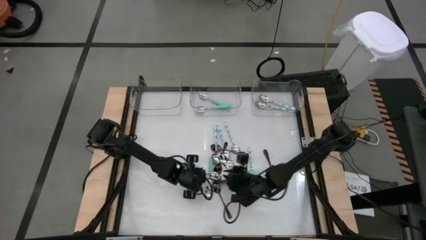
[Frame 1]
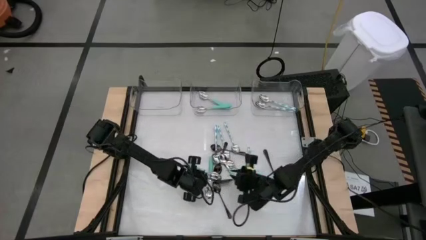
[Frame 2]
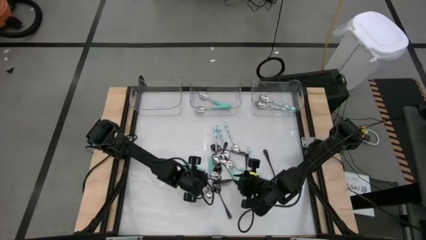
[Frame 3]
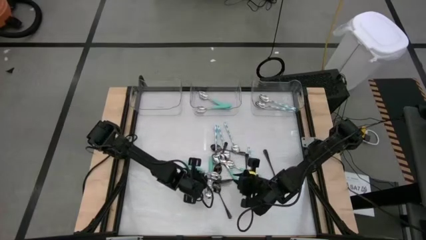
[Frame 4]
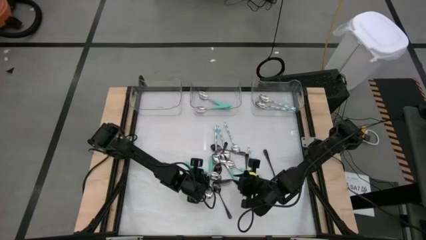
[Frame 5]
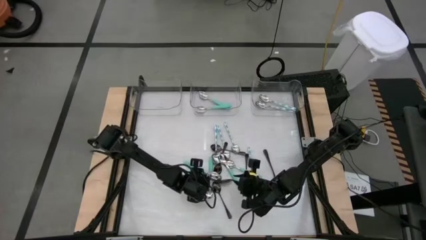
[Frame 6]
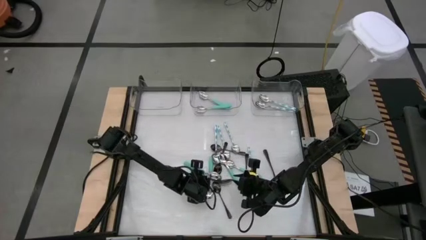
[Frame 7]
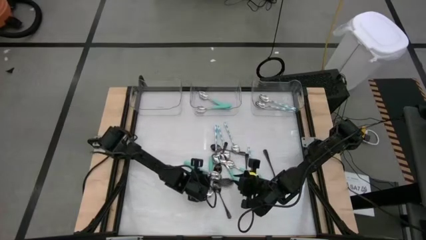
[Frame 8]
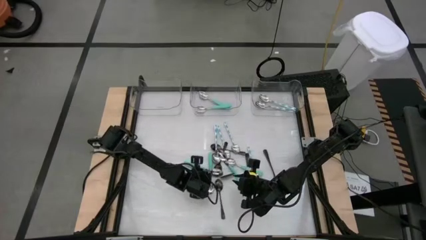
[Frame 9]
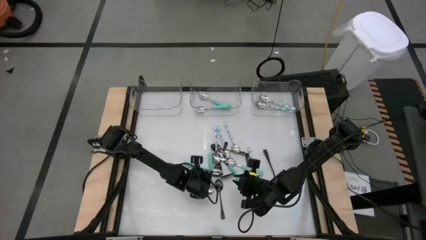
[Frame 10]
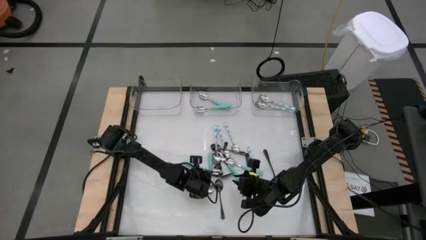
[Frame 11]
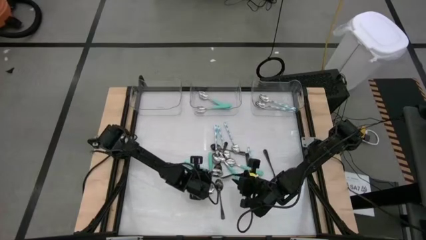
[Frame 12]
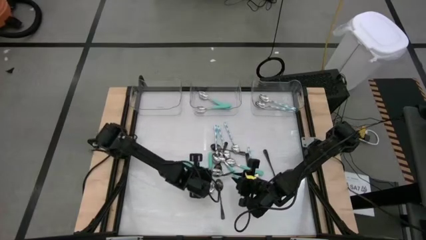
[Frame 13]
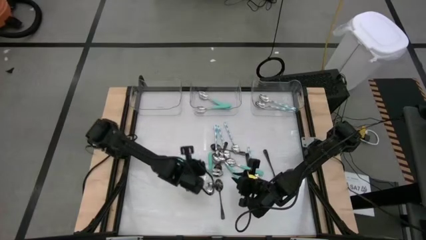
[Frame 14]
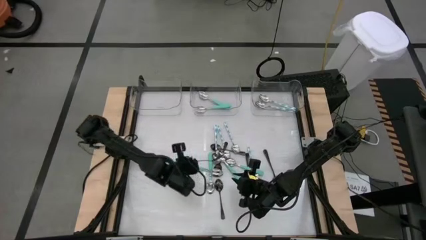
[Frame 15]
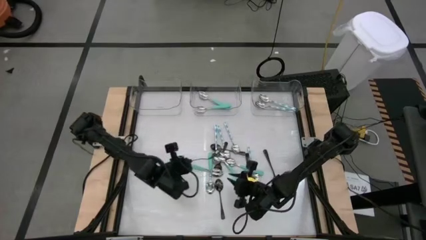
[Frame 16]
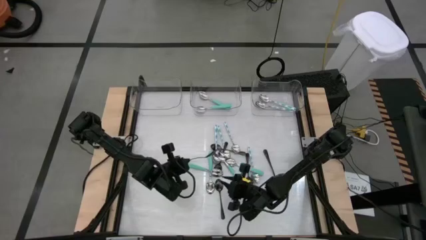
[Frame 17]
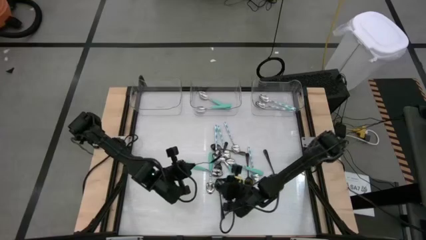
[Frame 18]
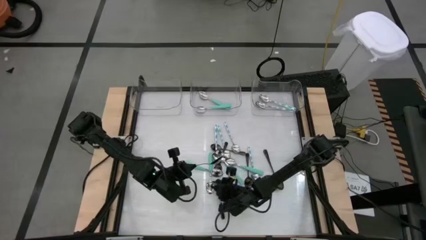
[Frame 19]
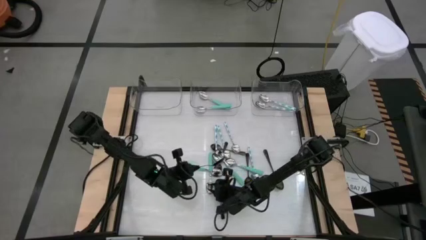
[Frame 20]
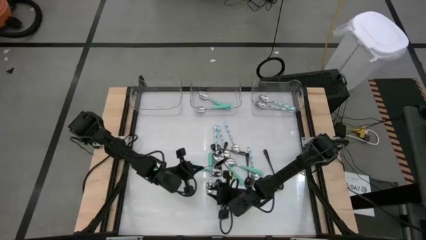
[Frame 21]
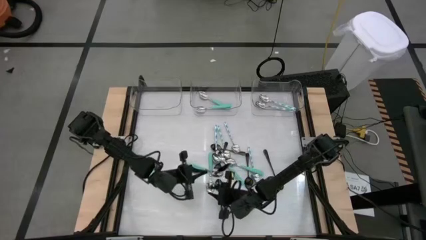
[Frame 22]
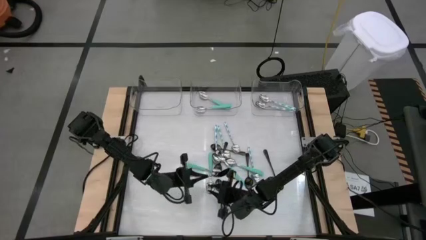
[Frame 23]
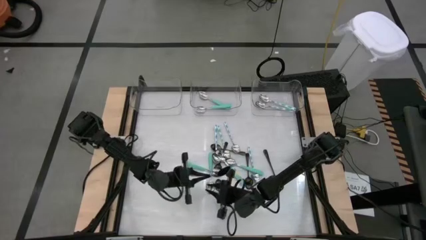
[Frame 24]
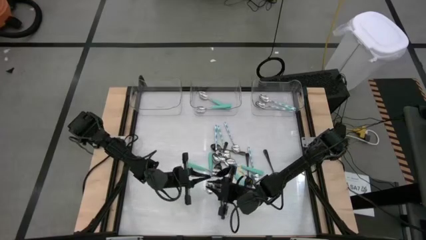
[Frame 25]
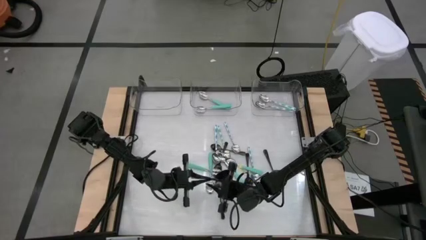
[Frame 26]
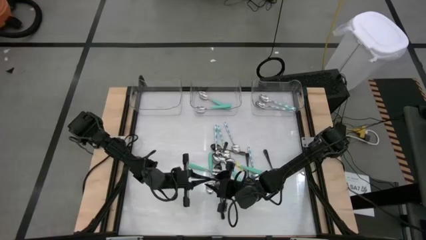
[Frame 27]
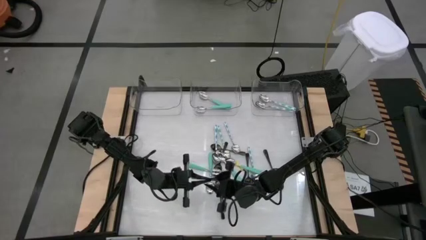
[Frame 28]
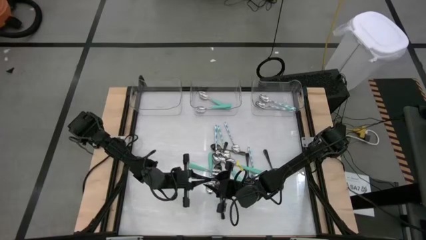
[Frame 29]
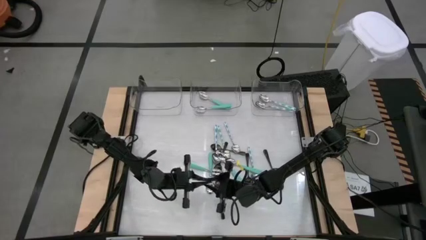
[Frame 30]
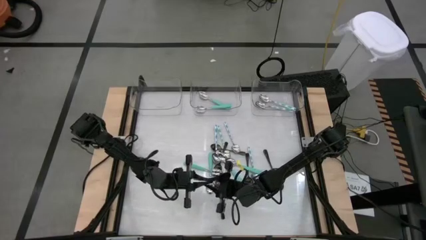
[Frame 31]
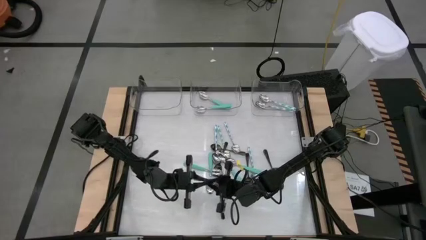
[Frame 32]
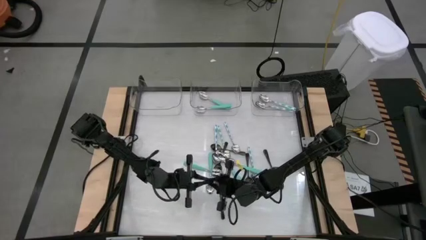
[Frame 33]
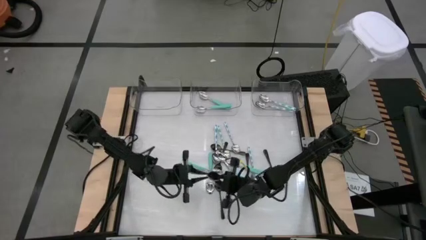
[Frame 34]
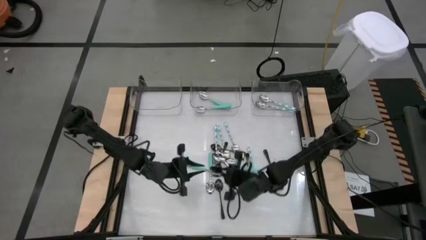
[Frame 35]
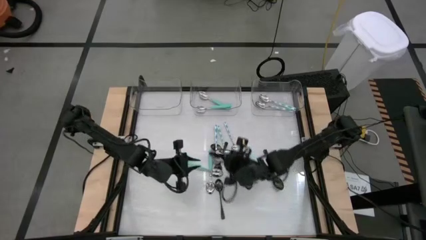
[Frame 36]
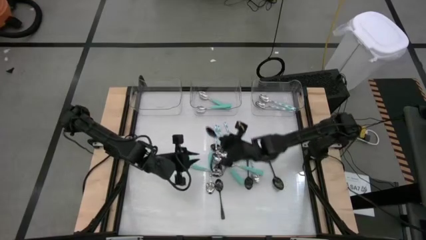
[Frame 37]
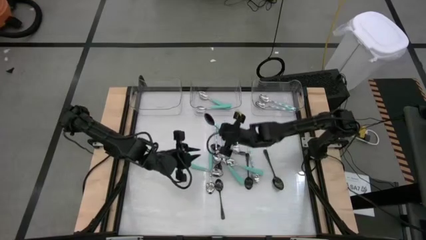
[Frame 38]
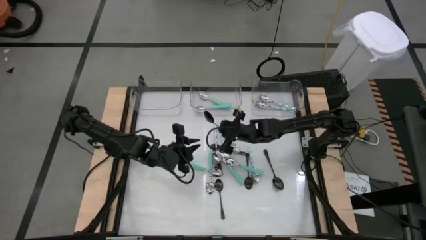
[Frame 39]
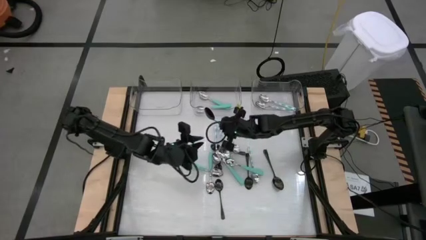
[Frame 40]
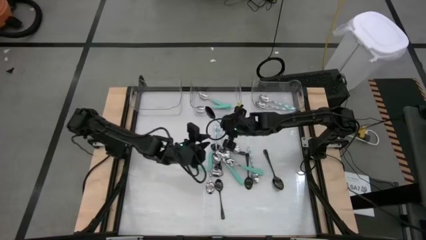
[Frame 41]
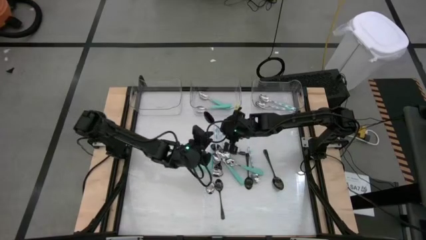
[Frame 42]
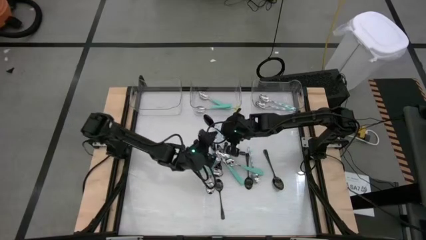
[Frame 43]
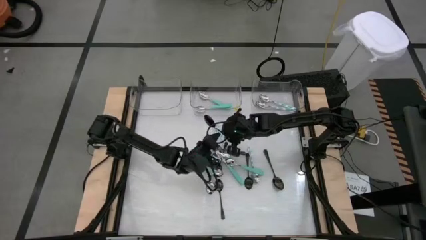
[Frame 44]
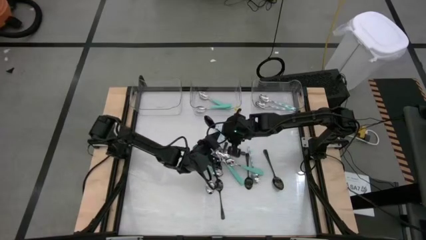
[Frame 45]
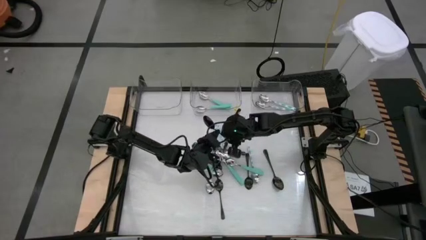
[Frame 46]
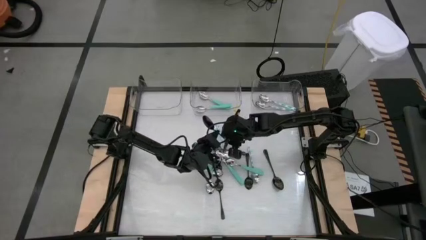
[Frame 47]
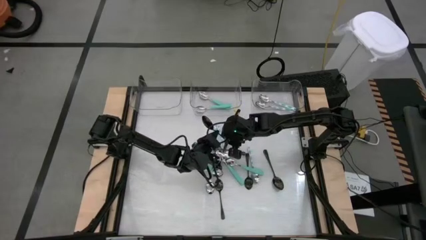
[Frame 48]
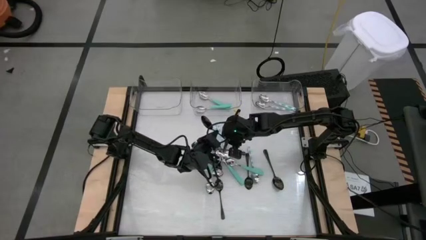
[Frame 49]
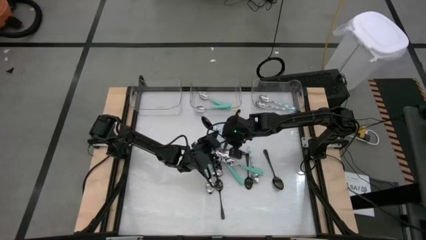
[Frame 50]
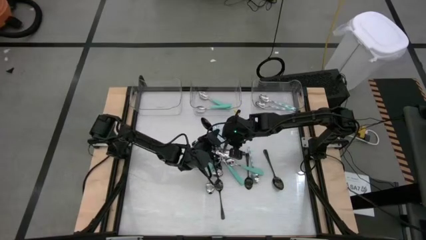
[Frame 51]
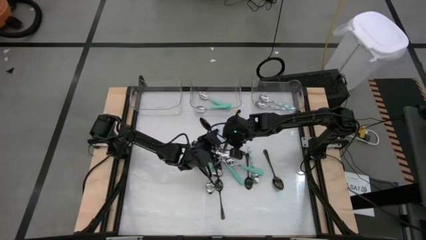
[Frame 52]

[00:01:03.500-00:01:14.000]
Task: Sort silverware by color (type)
Put the black spoon into the left transparent bin
